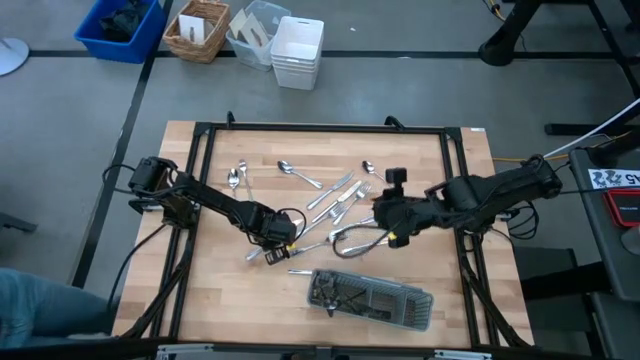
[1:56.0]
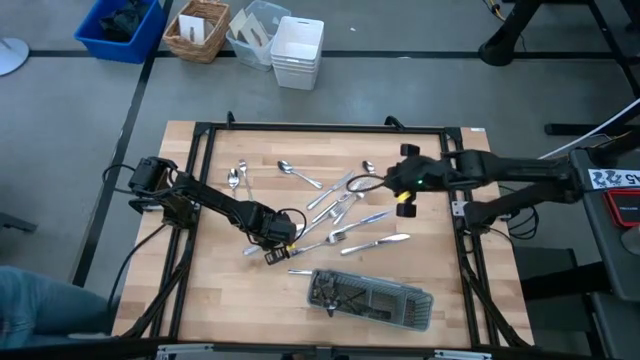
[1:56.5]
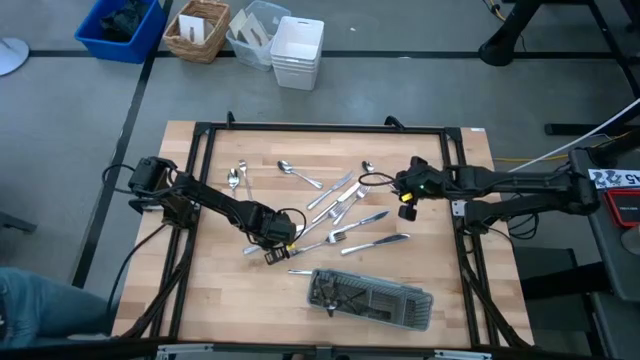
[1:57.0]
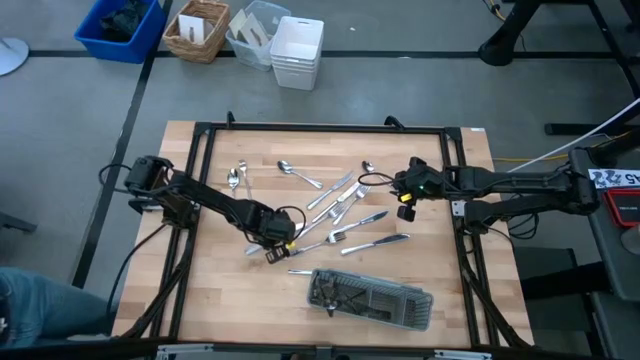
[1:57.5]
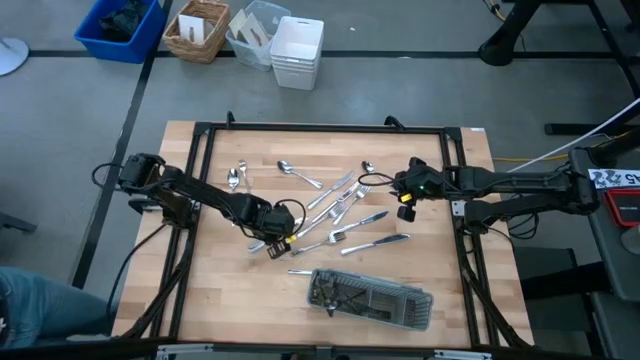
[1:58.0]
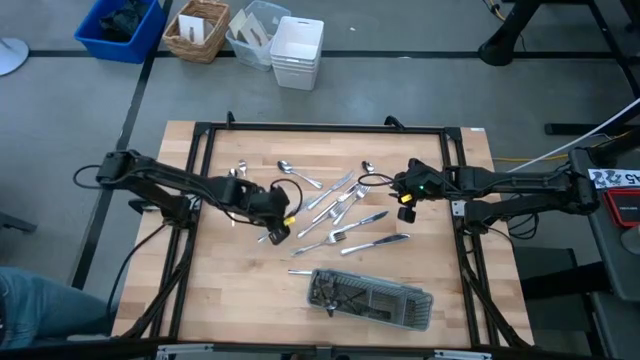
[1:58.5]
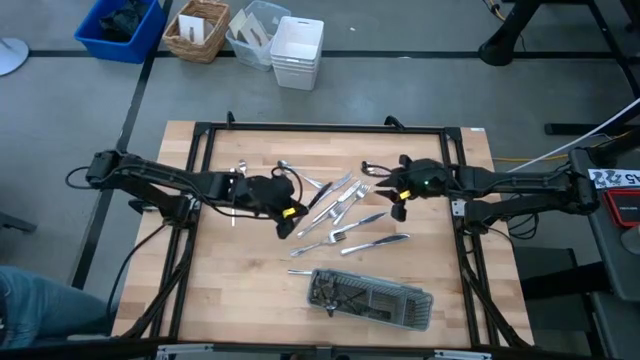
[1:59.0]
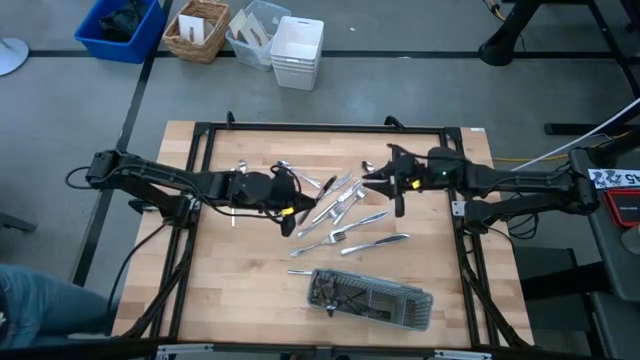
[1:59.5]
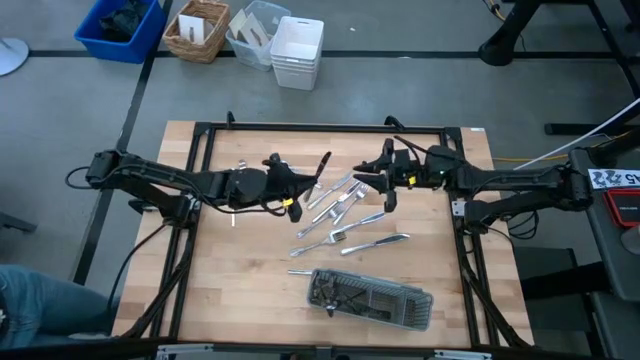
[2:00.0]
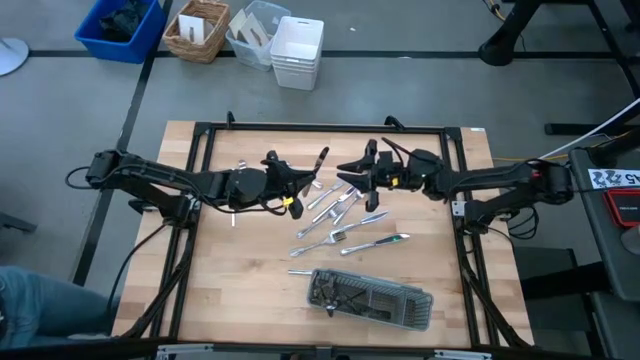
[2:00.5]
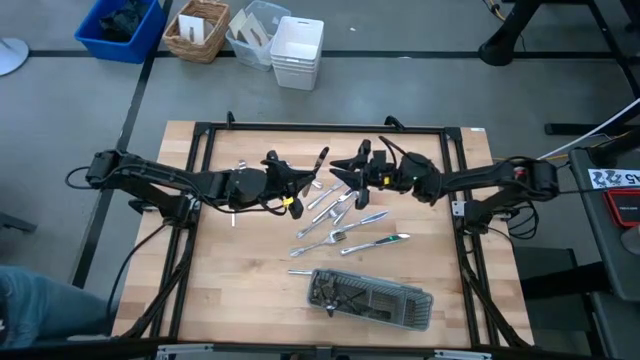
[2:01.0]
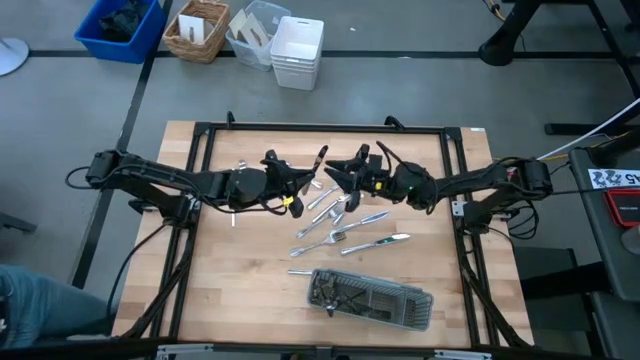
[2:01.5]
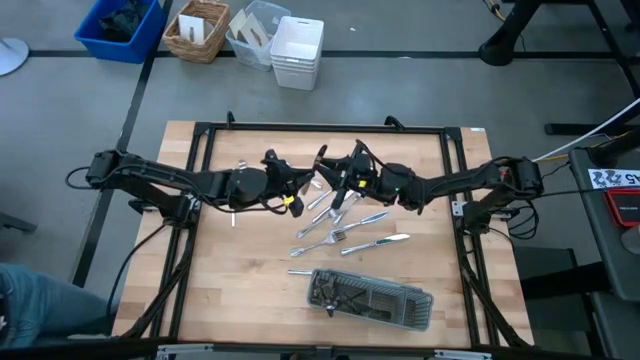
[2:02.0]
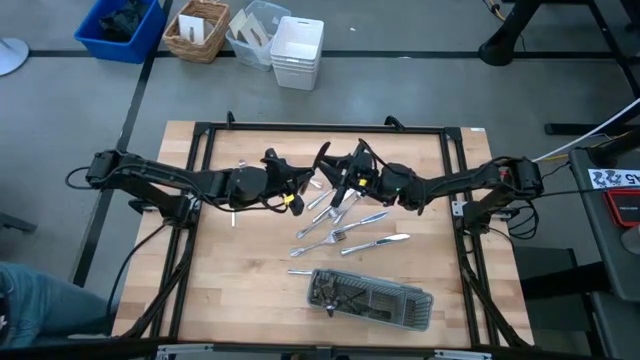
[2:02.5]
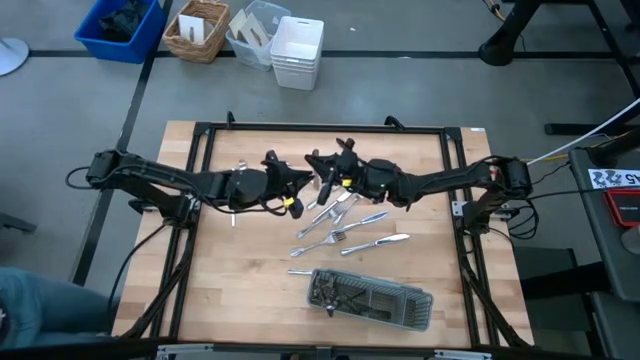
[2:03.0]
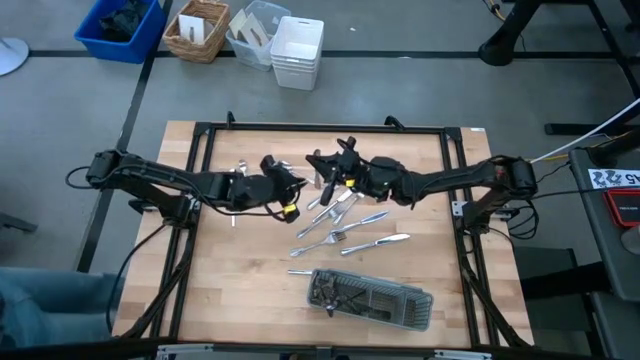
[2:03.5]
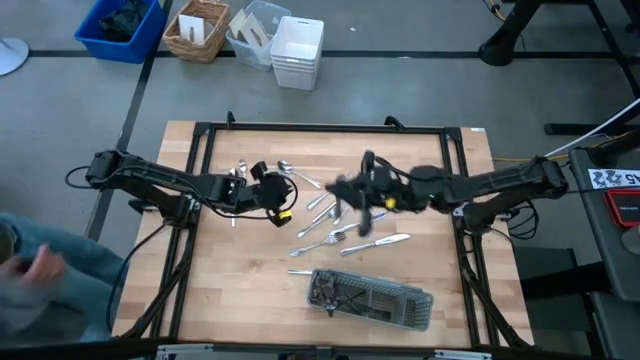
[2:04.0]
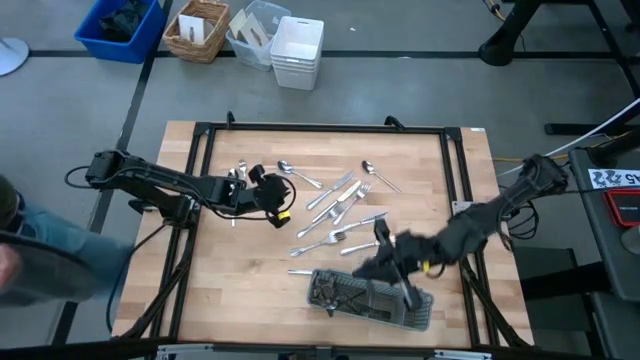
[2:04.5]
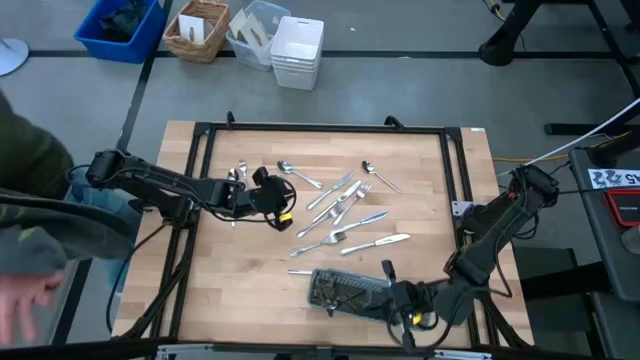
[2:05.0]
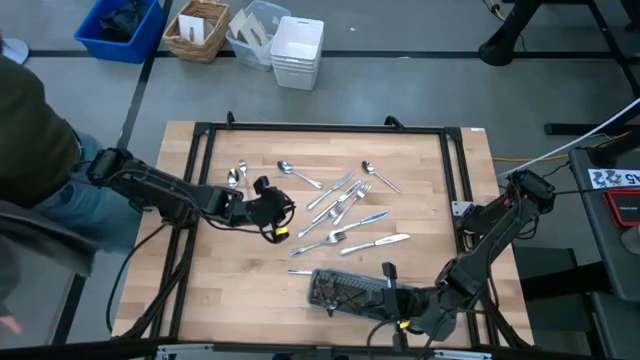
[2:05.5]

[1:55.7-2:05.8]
Task: Sort silverware
Put the knife into the gray silverware rack

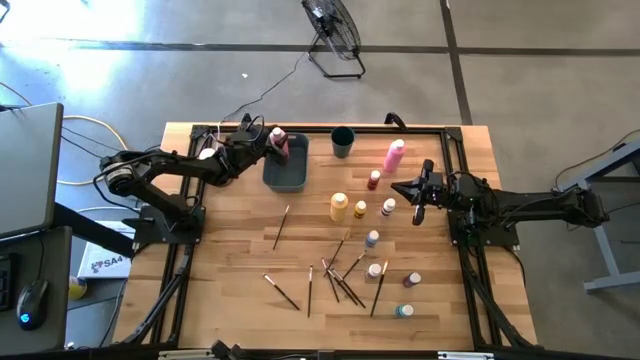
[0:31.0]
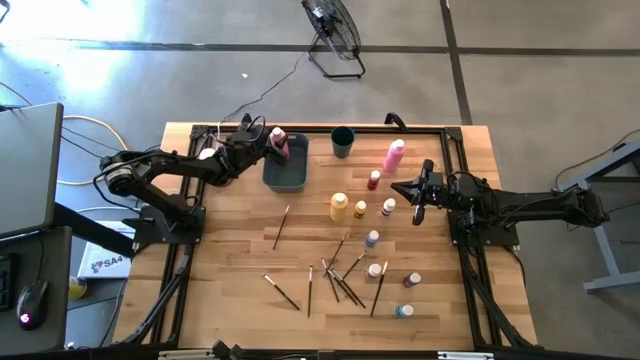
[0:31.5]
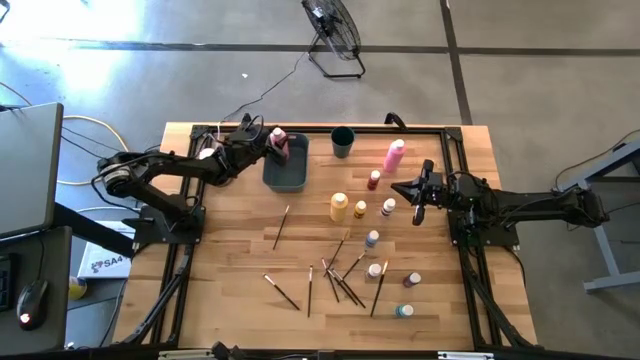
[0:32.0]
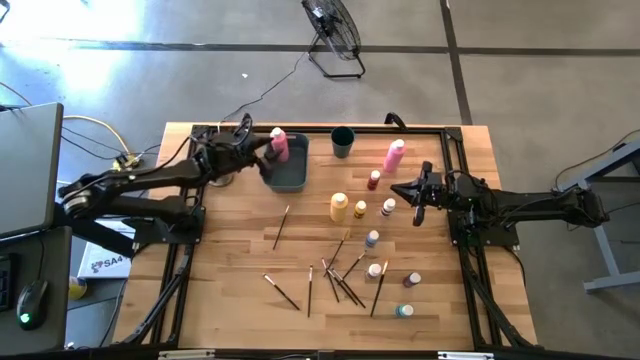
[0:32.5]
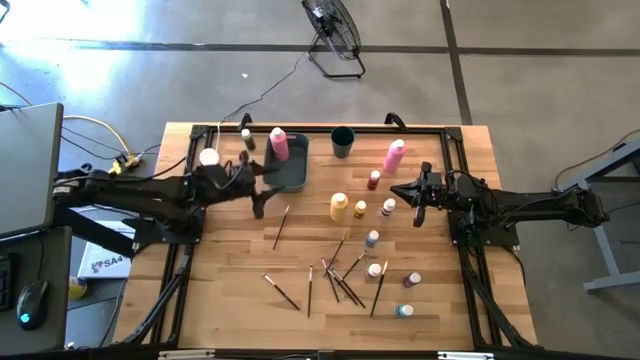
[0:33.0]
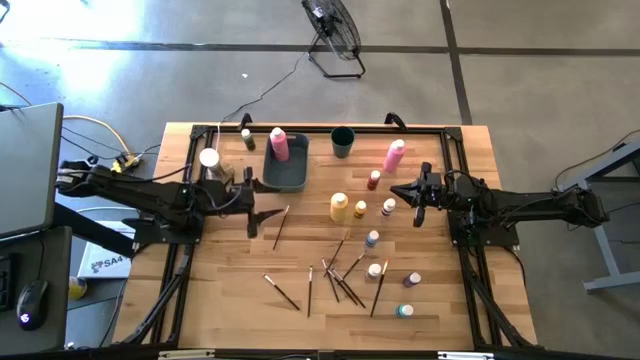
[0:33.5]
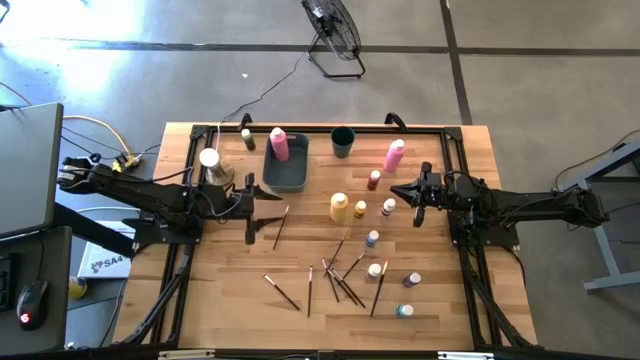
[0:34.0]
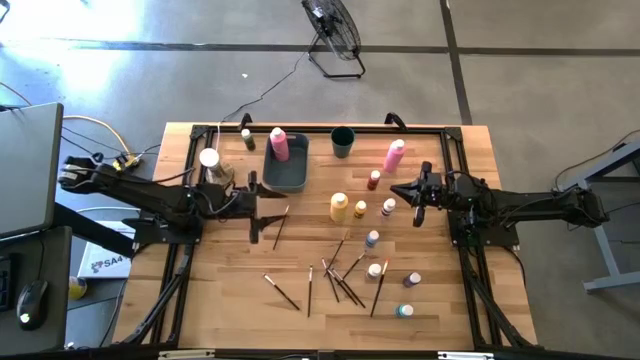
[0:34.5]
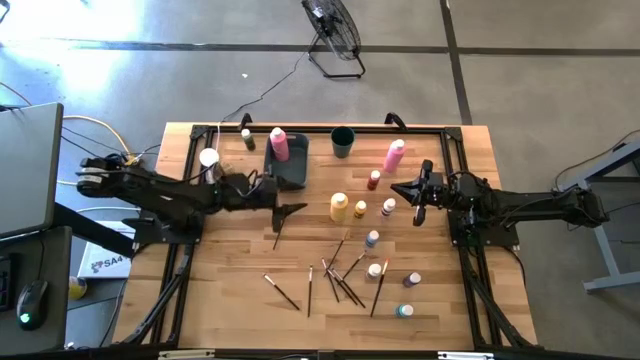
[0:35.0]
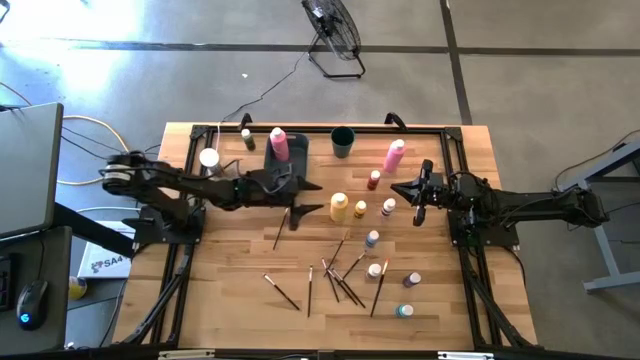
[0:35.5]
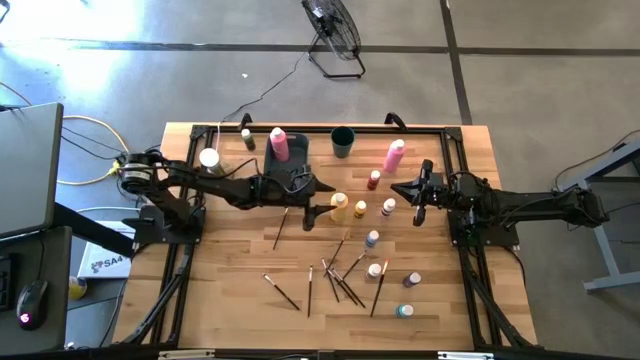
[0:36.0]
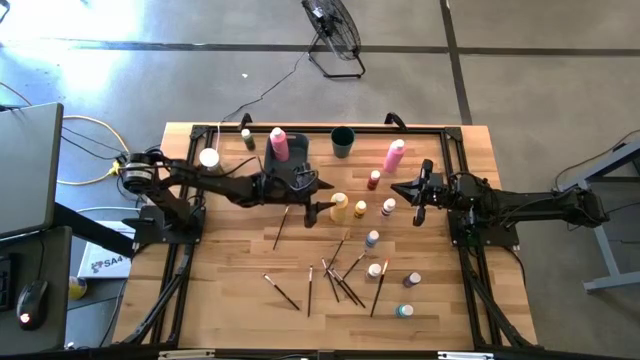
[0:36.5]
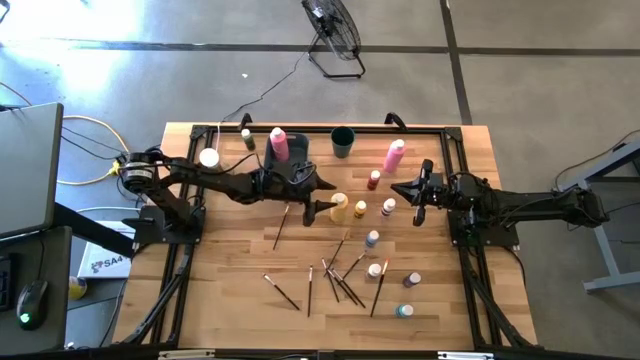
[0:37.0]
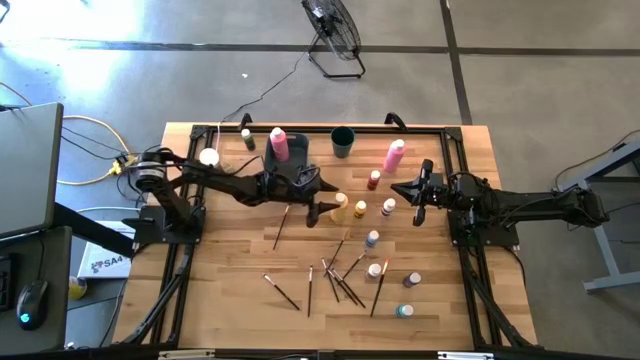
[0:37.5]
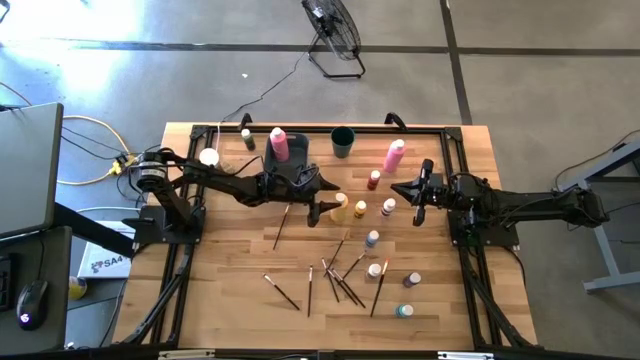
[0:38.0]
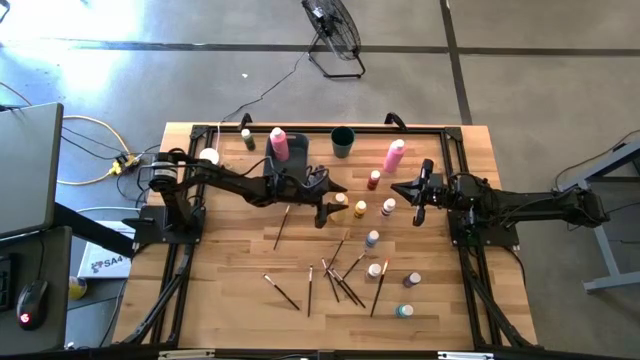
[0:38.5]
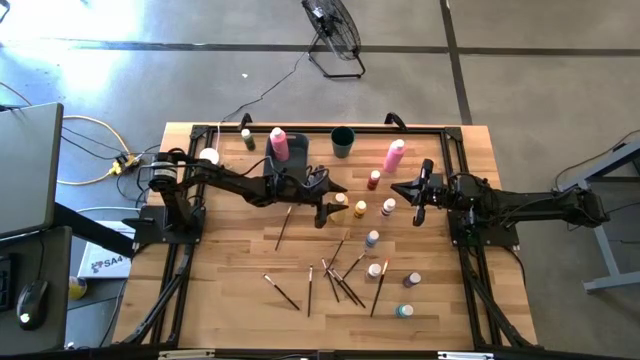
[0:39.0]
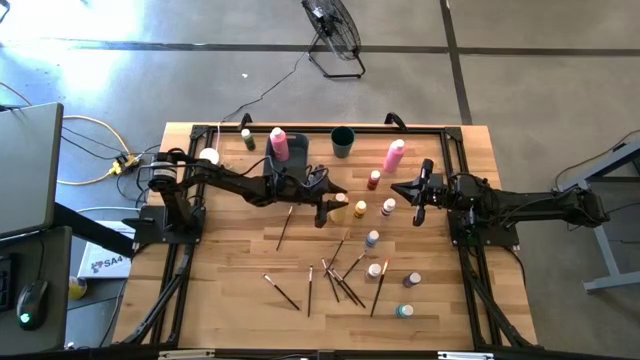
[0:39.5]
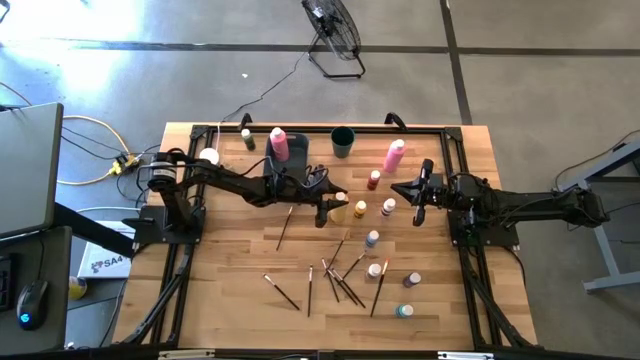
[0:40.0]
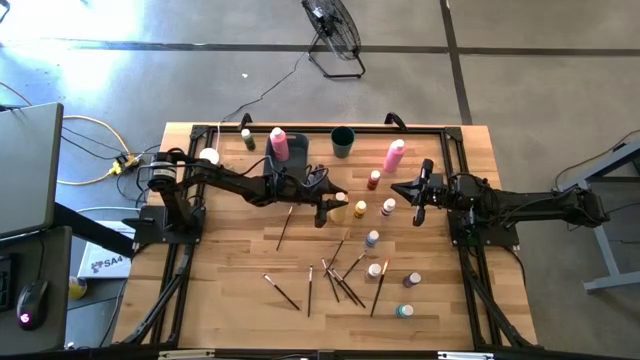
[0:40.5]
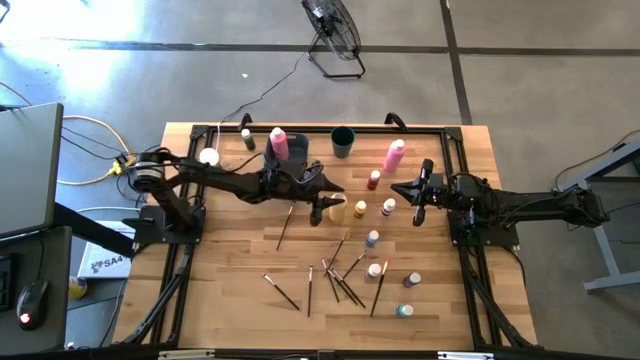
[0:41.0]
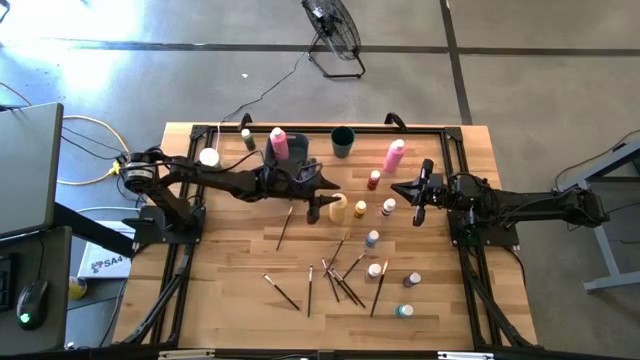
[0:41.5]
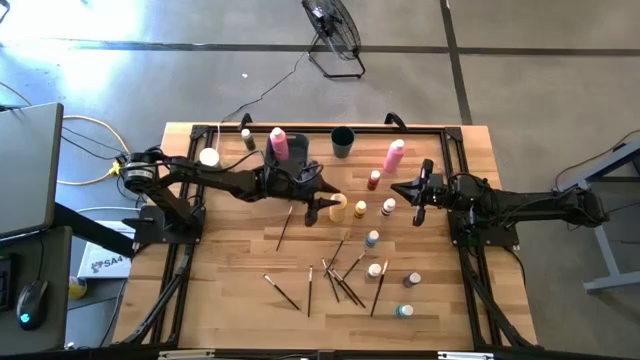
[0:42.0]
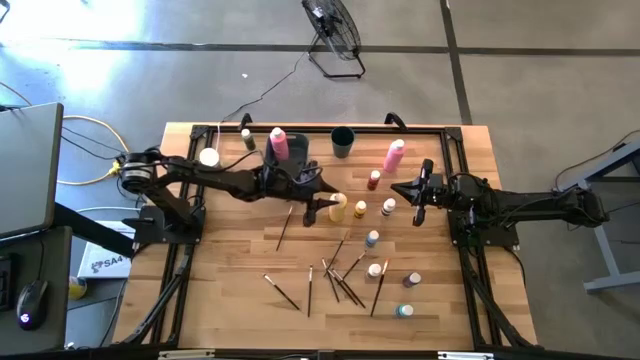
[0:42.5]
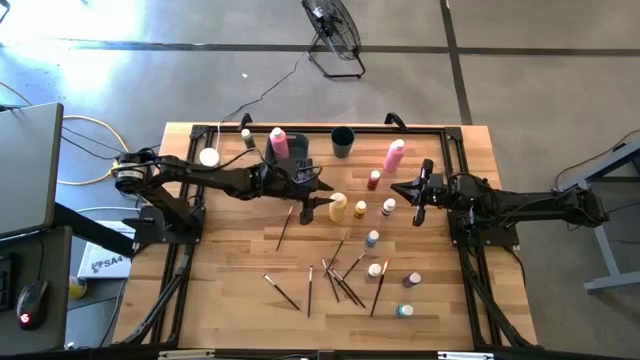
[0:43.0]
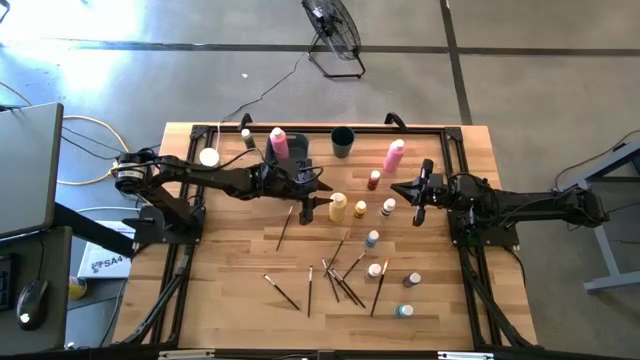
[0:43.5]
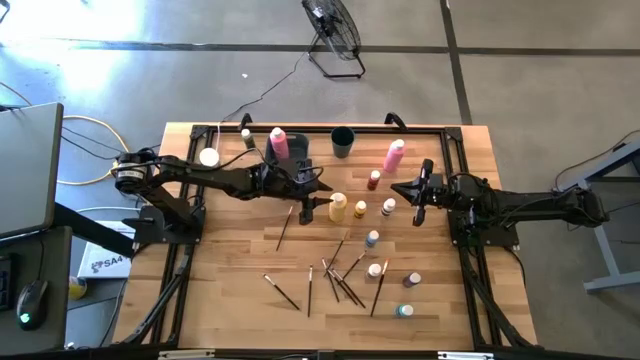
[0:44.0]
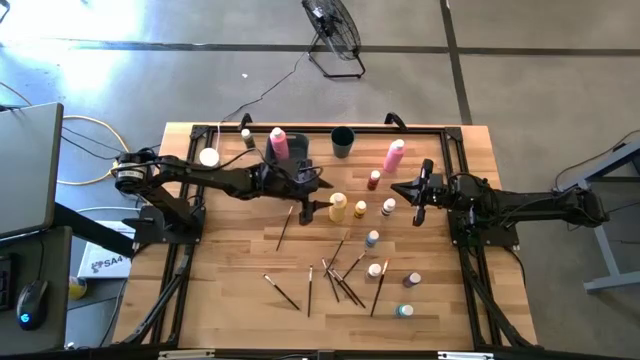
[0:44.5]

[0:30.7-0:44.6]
Task: Pick & Place Paint Supplies
Put the large yellow paint bottle into the green bin
